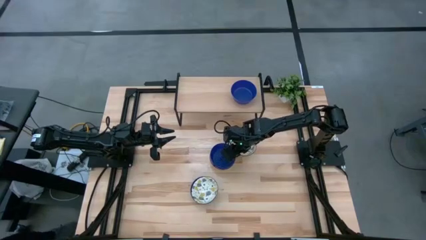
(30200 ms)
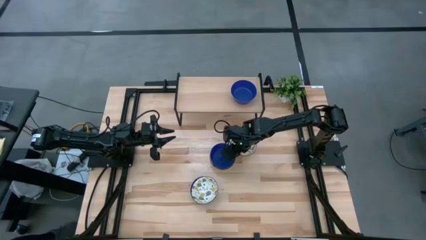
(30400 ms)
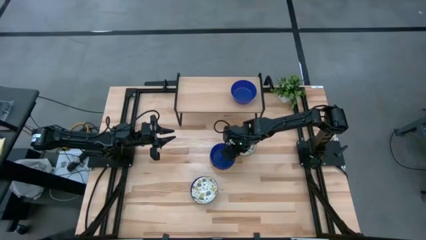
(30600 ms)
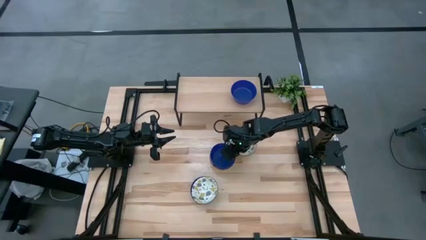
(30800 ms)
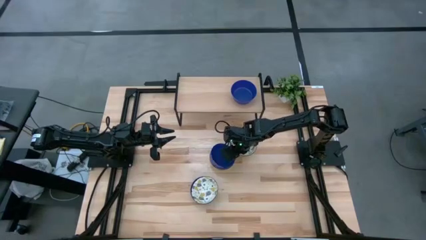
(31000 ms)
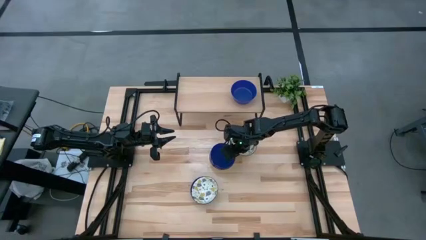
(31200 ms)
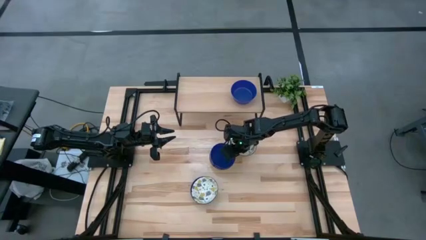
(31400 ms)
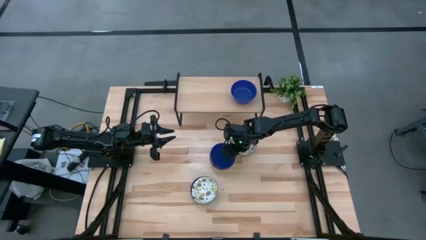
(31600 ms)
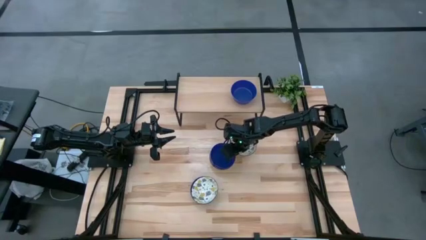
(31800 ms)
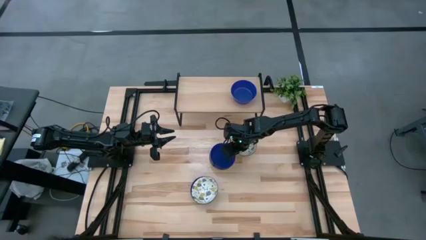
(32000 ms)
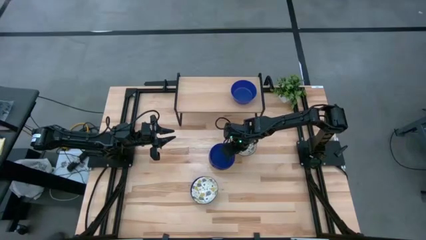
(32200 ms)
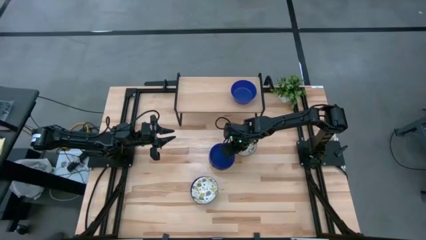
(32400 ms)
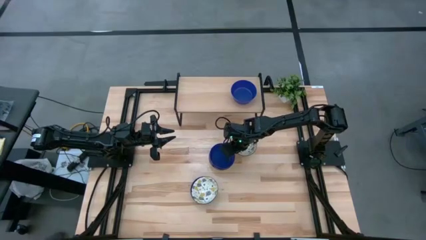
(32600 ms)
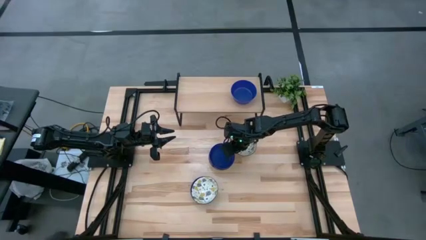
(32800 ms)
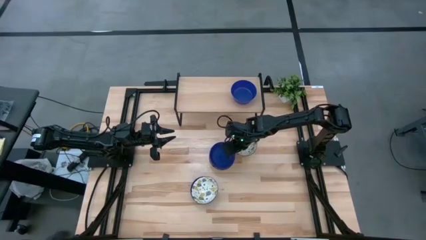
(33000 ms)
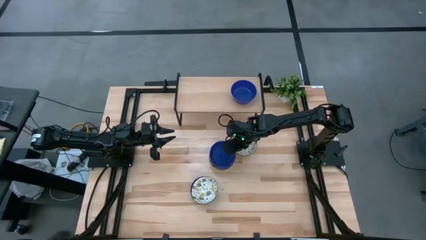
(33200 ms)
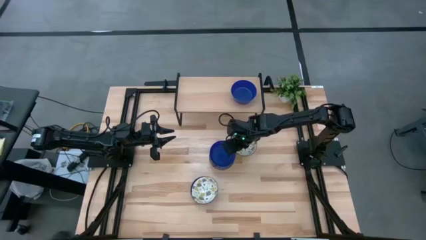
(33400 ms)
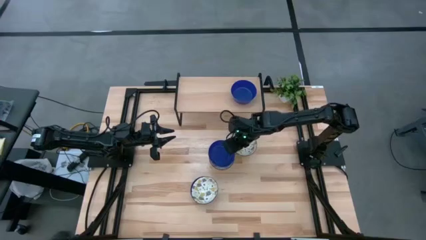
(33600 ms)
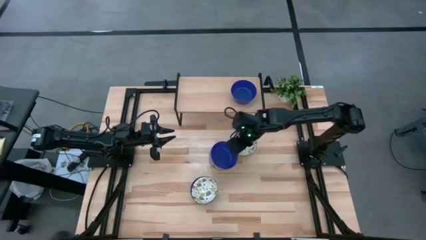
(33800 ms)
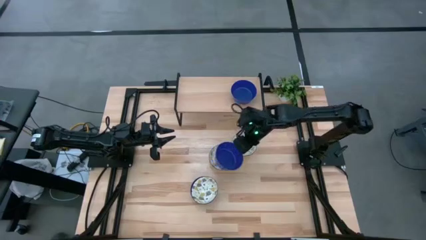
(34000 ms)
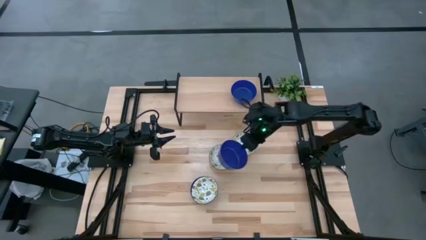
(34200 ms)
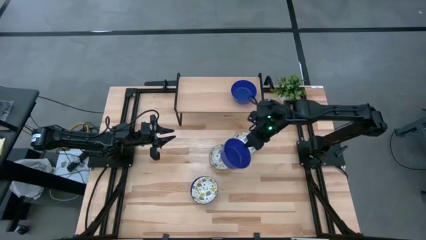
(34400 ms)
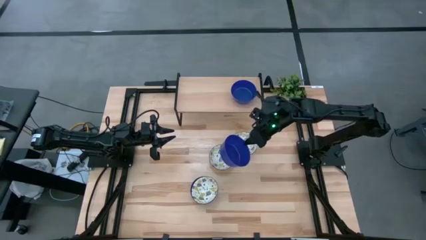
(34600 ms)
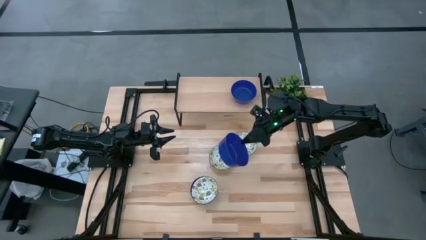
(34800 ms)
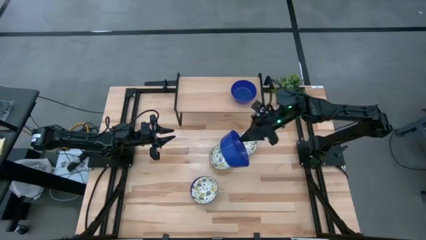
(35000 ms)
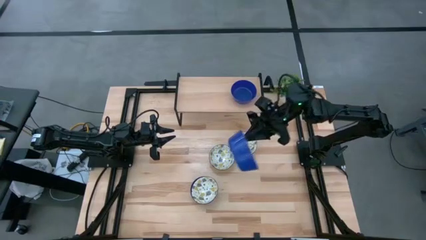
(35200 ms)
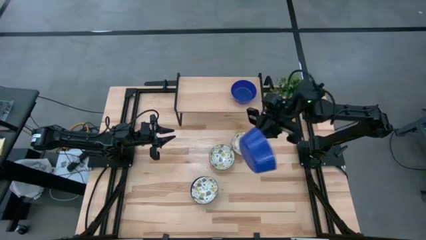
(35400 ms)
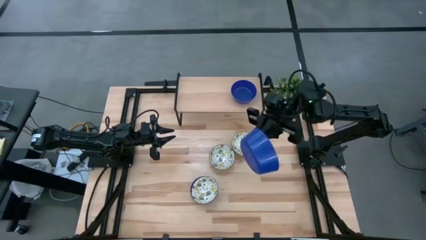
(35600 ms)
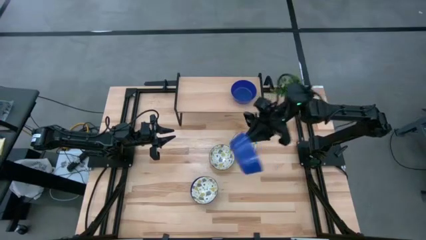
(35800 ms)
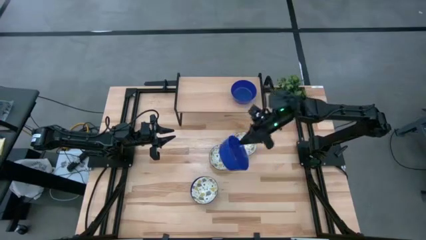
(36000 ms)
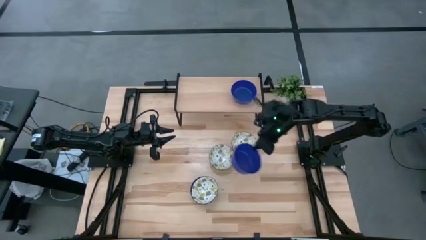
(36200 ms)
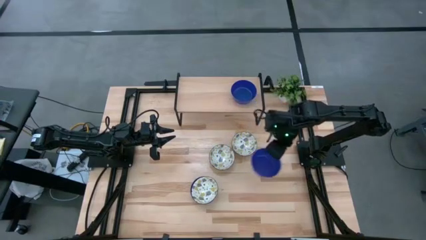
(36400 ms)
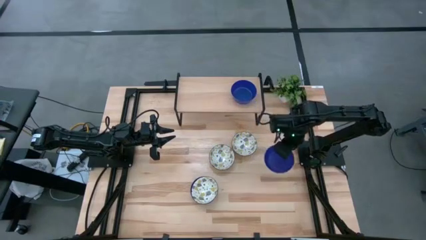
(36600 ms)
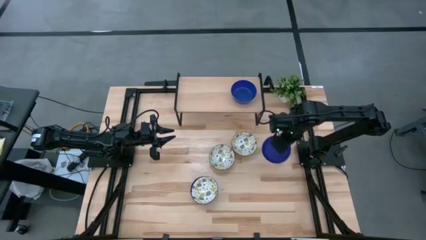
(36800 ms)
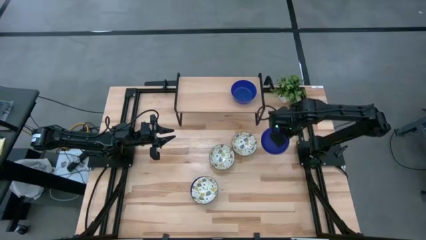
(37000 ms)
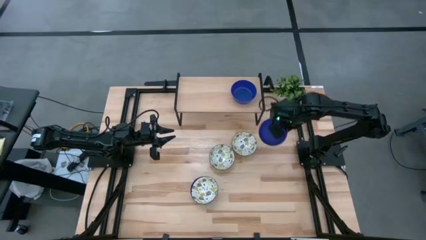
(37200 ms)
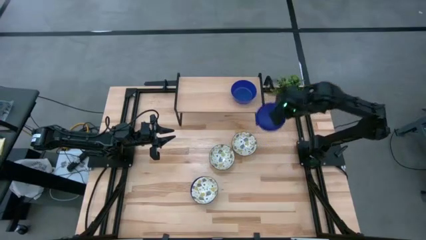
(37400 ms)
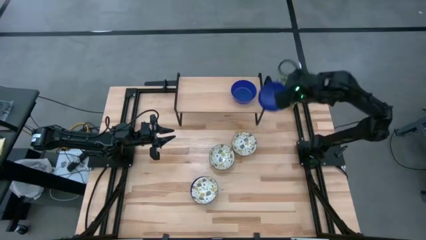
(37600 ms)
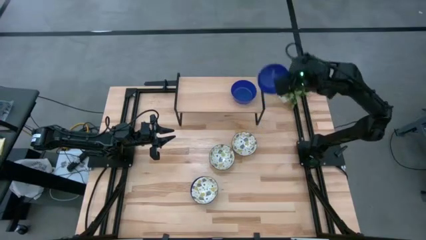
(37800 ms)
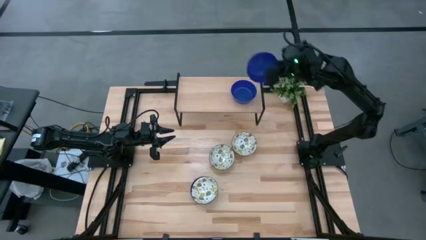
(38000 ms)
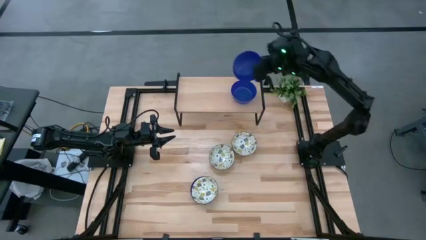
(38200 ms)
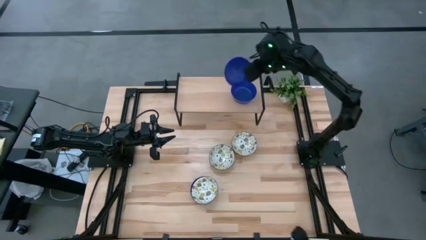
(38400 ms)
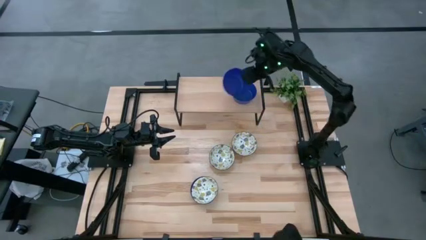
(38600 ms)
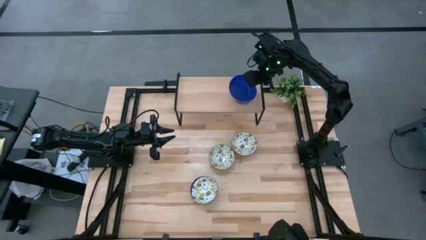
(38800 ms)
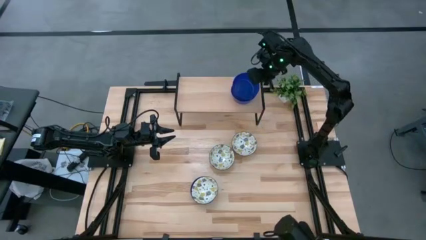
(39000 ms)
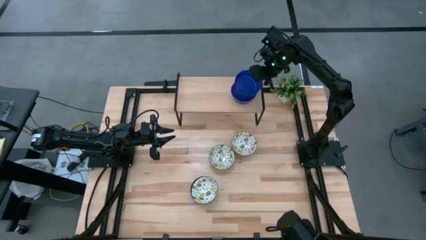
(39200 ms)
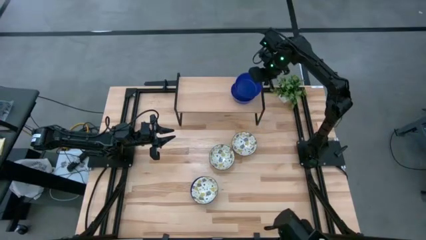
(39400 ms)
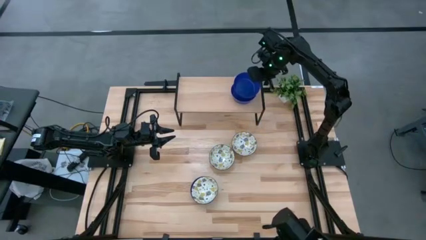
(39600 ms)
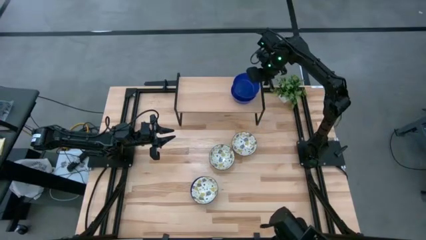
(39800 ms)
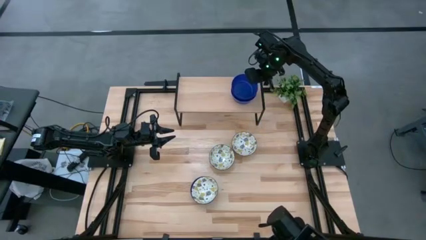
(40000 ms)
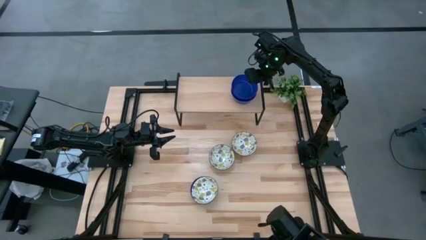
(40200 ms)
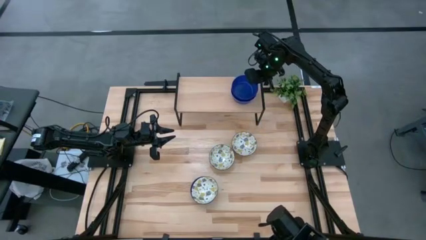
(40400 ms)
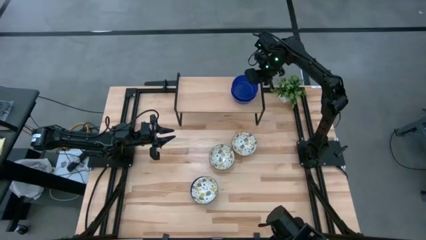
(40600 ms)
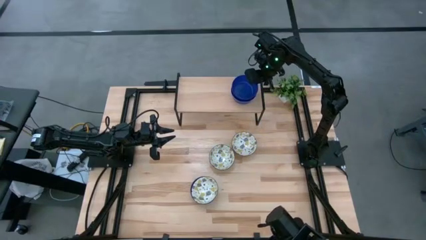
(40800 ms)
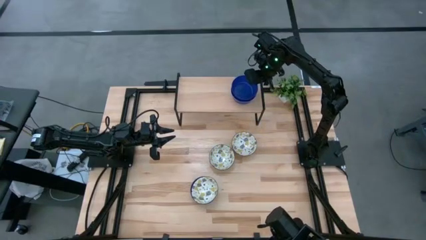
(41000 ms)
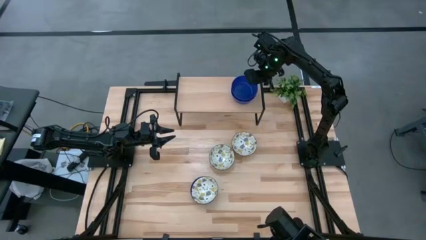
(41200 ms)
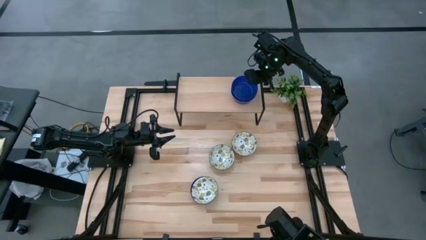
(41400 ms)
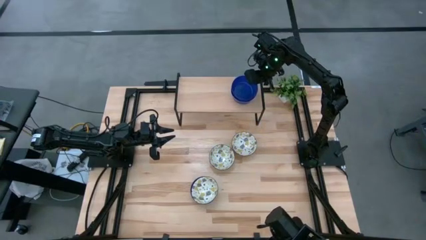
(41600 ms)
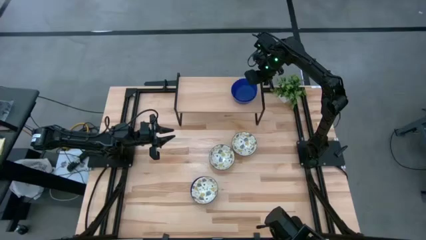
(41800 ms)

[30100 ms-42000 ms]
Task: Pick & Place Mini bowls
Stack the top blue bowl on top of the blue bowl on the shelf
